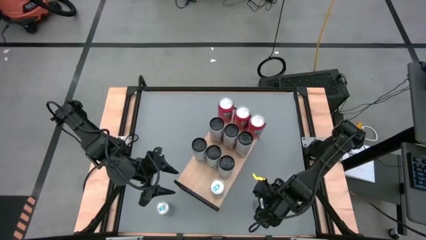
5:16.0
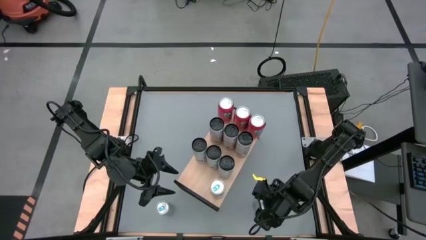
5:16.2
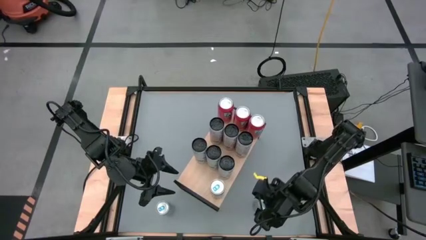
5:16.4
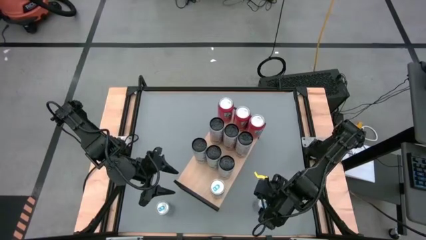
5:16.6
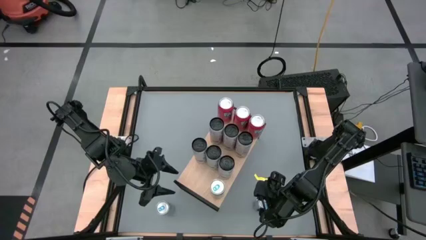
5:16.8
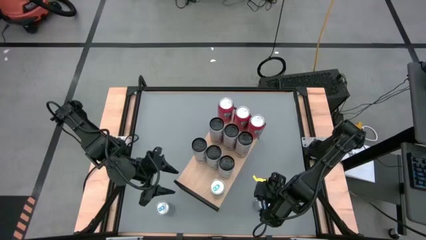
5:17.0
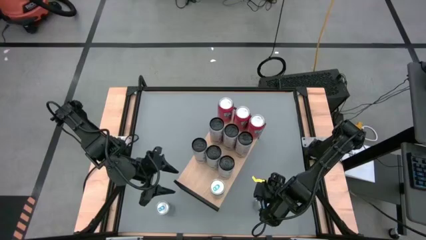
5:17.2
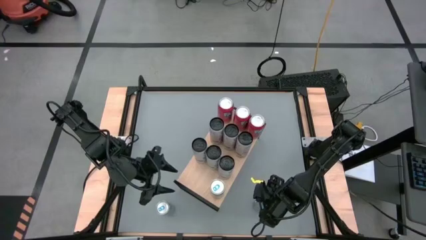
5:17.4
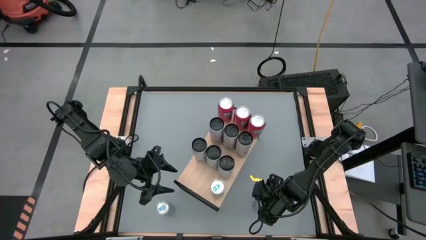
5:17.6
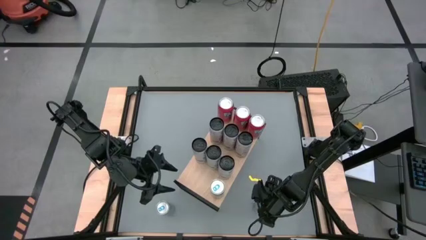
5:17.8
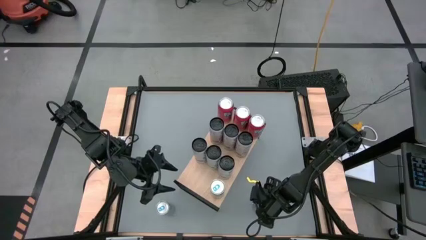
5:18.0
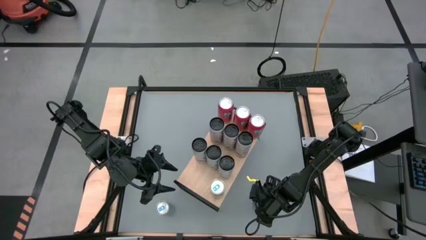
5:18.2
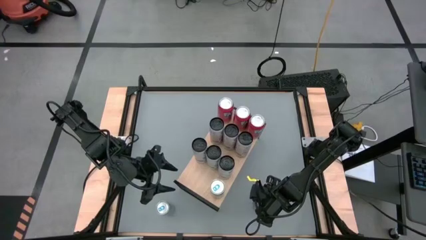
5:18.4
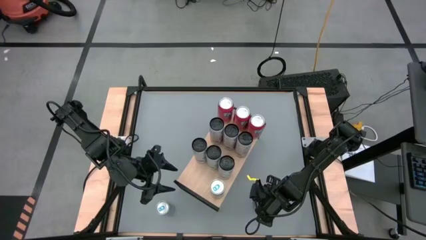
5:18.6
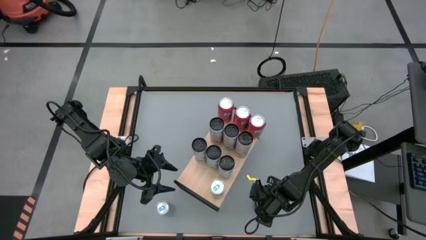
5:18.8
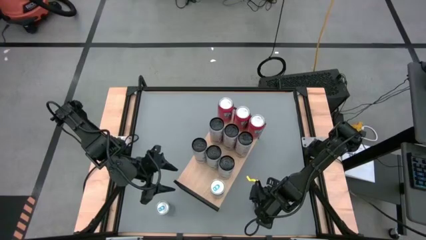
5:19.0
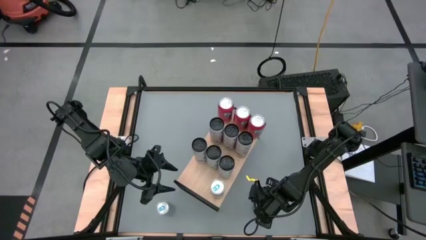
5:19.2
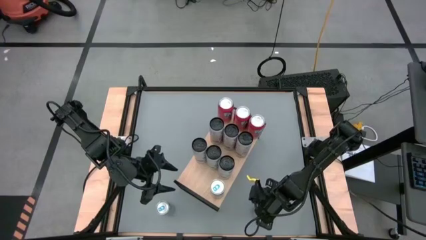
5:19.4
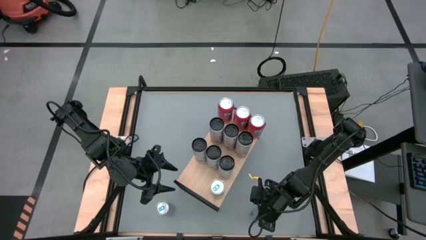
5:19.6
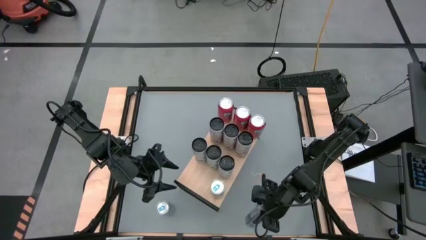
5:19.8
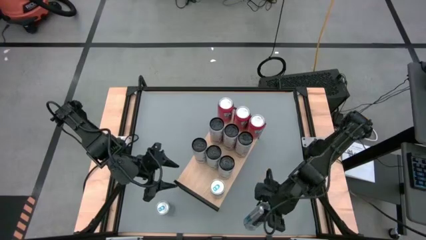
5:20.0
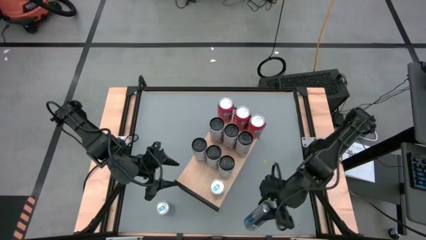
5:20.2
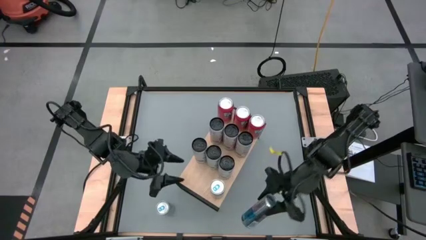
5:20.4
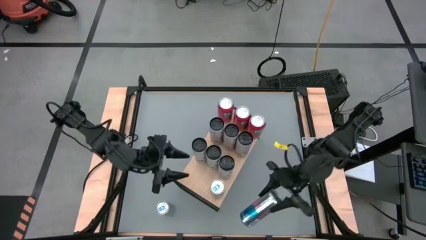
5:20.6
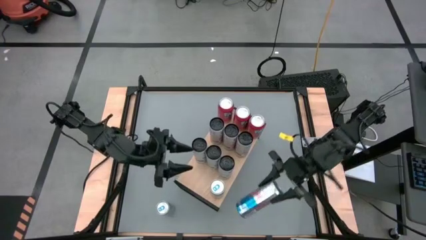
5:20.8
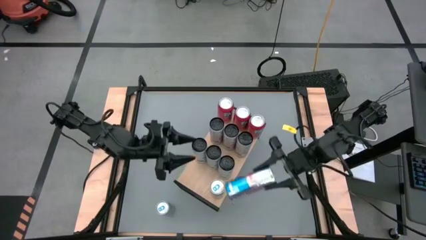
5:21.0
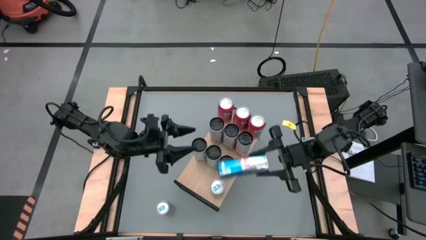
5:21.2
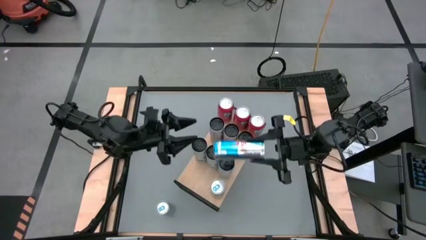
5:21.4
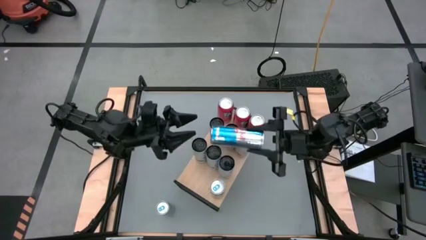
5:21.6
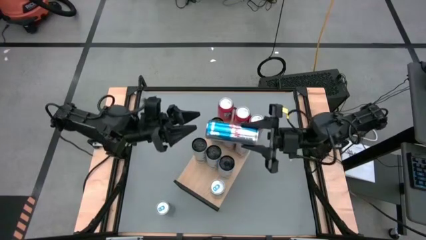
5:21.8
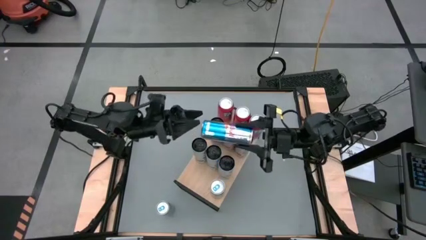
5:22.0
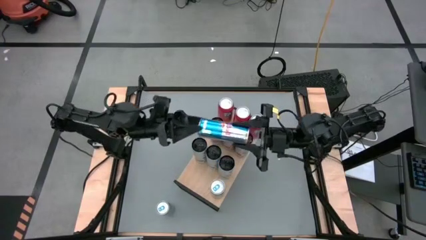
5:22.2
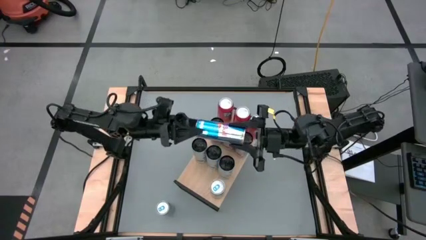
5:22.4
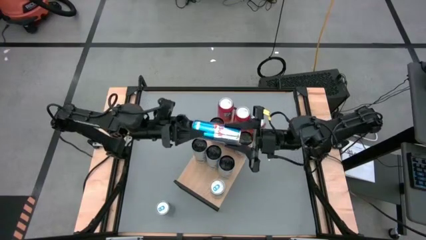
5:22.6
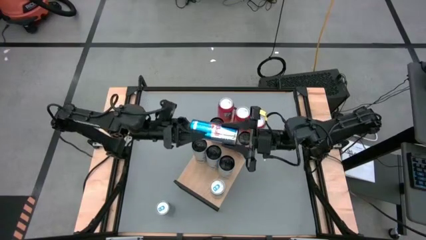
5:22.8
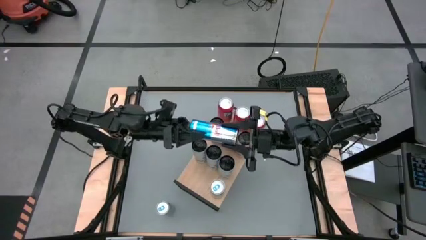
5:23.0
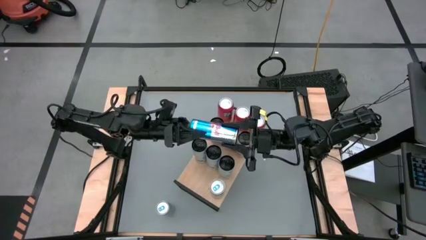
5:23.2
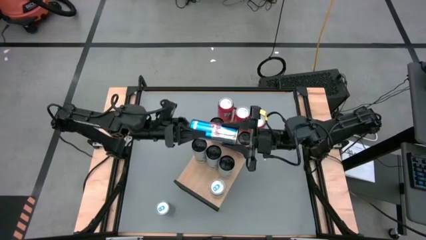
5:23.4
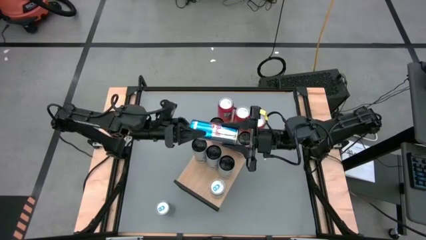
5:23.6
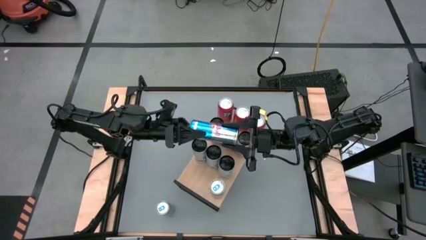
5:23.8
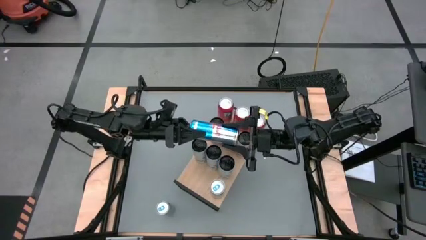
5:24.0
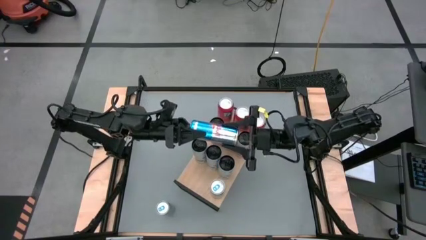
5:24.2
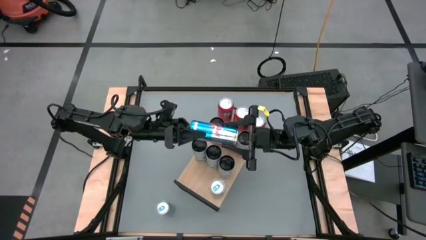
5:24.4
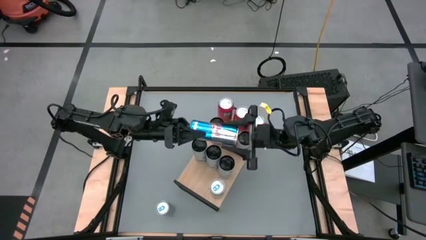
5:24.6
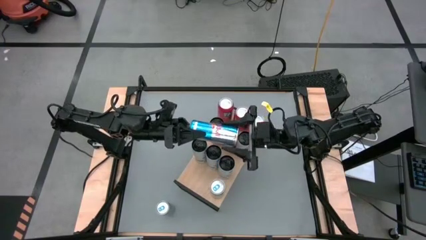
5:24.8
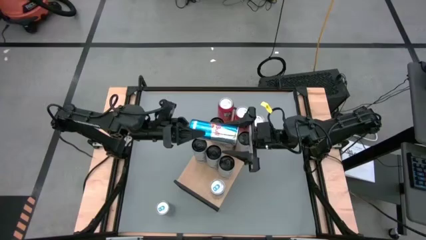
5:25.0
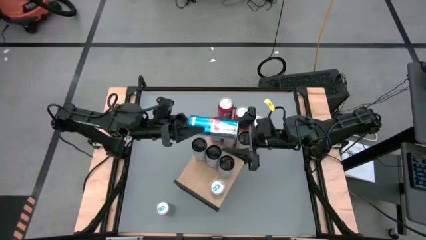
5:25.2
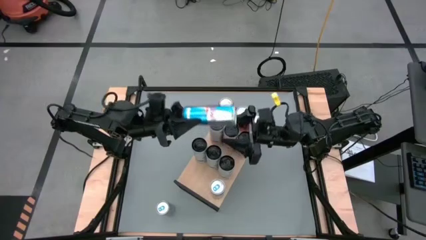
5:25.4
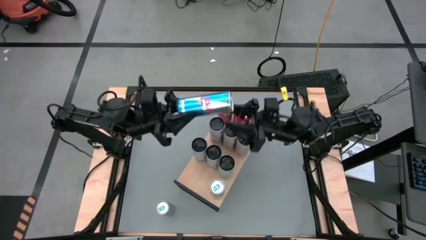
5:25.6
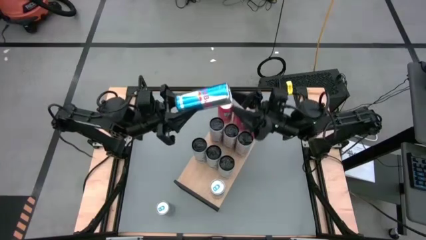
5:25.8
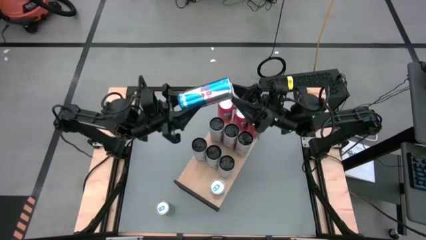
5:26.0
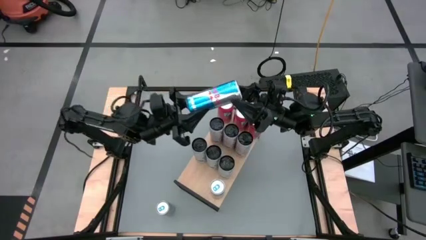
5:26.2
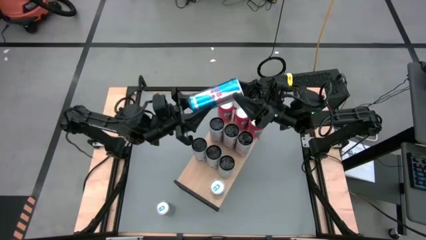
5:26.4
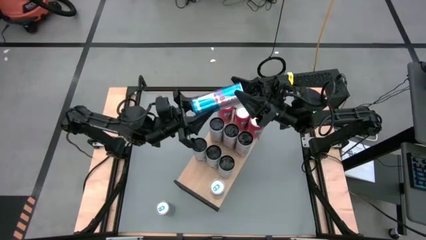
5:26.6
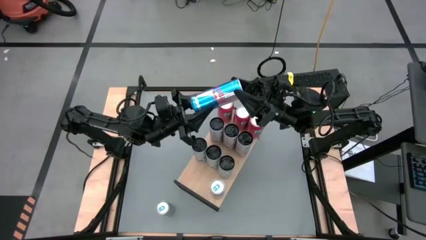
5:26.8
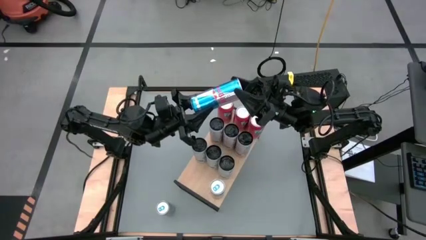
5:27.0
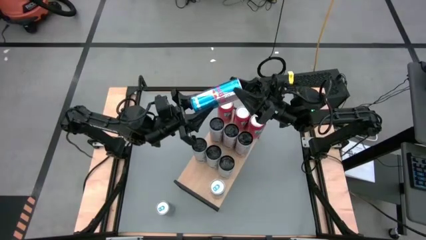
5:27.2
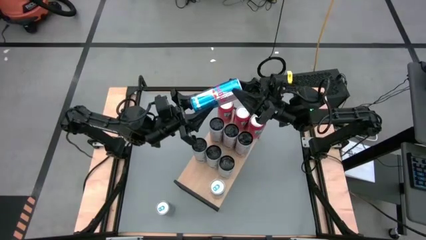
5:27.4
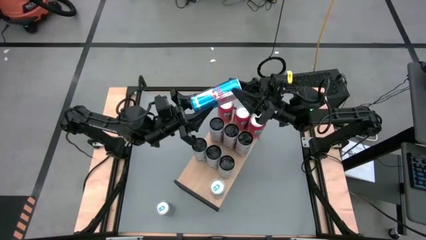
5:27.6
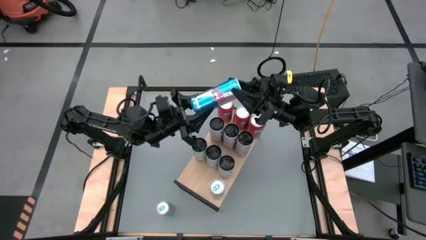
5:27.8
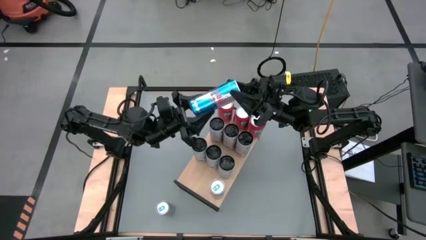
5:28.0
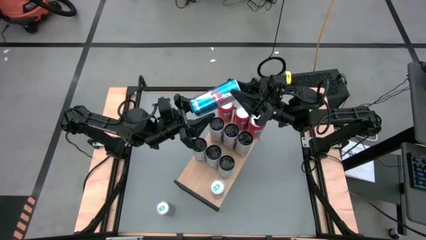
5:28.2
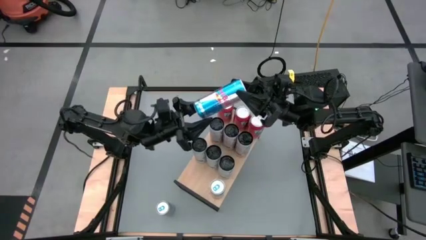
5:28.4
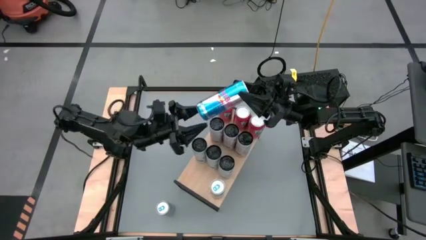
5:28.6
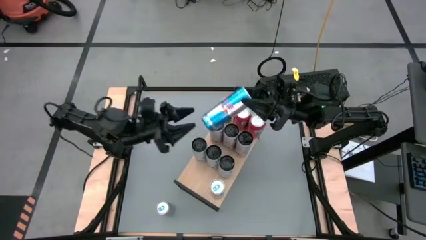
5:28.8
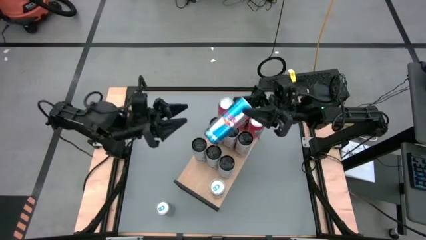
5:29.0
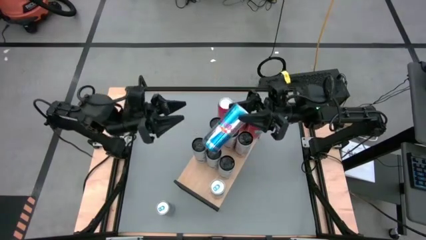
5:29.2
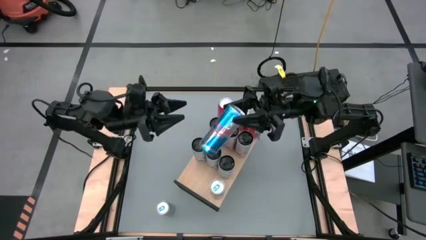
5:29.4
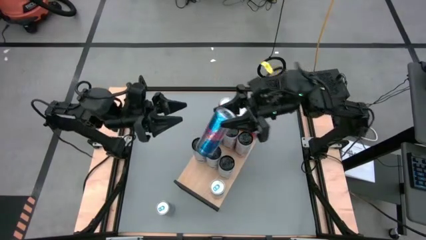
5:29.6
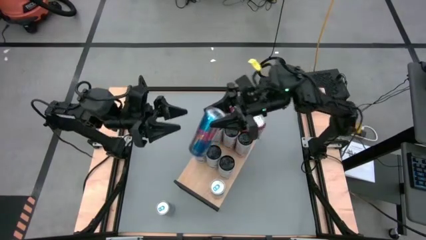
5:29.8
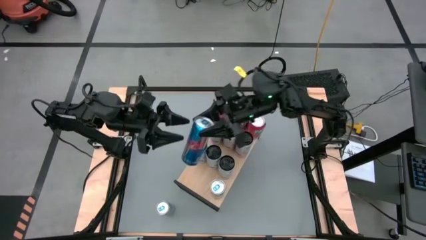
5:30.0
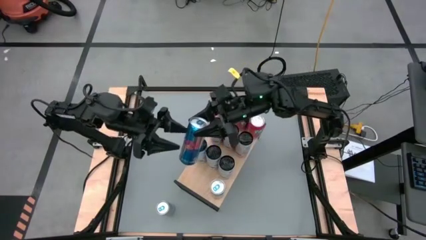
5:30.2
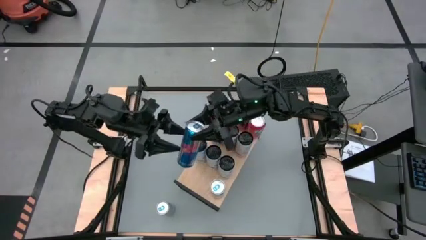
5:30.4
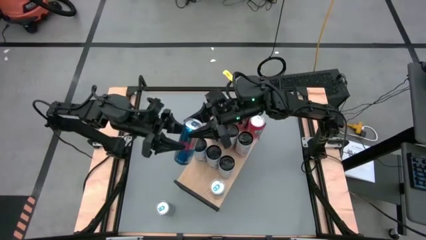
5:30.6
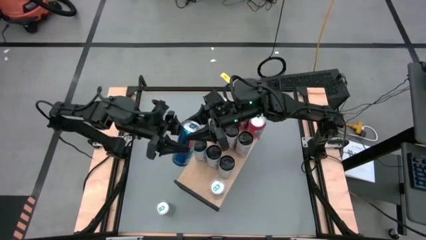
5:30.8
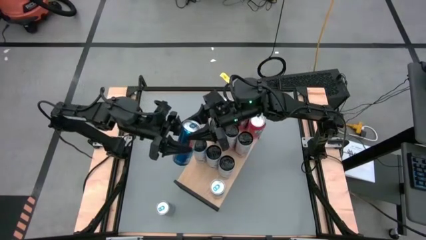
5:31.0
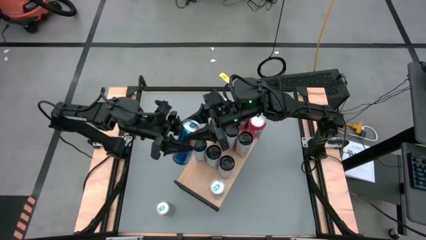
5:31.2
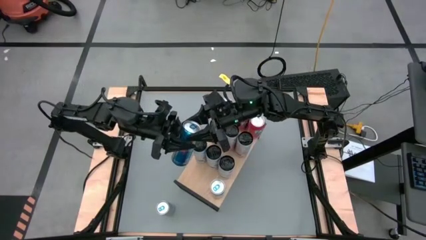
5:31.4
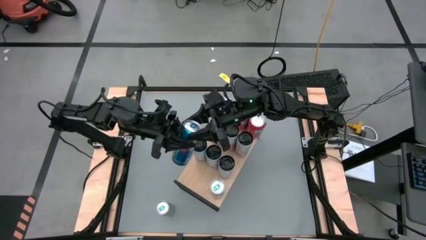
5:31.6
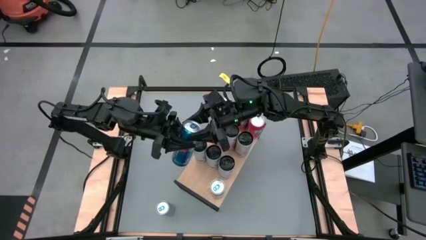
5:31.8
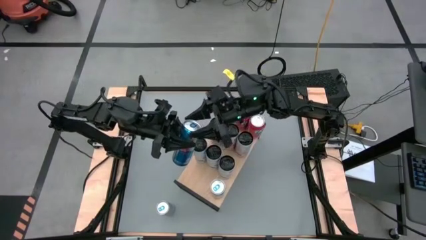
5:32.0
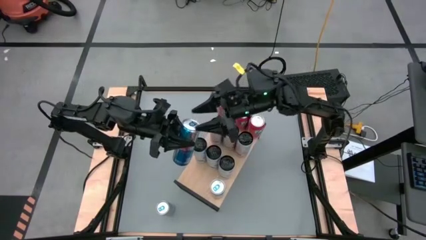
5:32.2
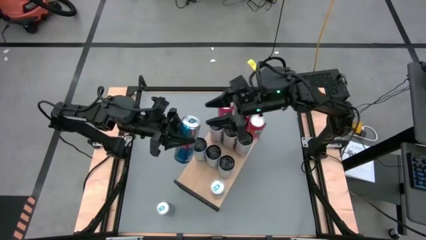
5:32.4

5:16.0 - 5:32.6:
Task: Place canned beverage on shelf
Put the blue soda can on the shelf aligned with the other blue soda can
